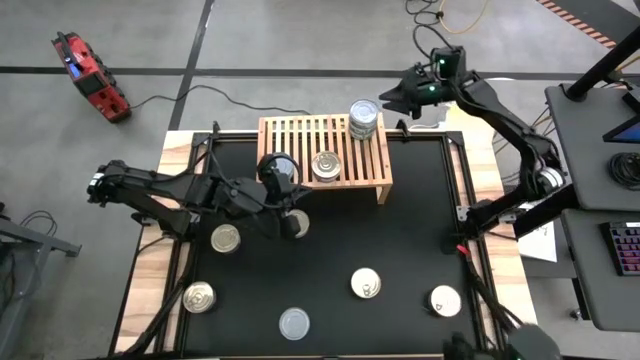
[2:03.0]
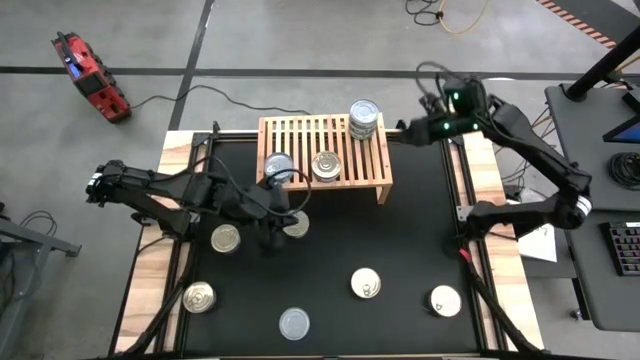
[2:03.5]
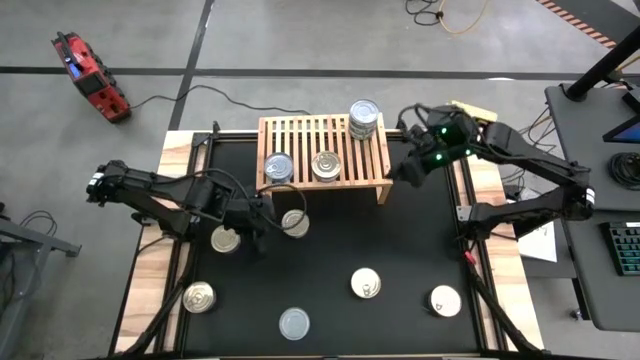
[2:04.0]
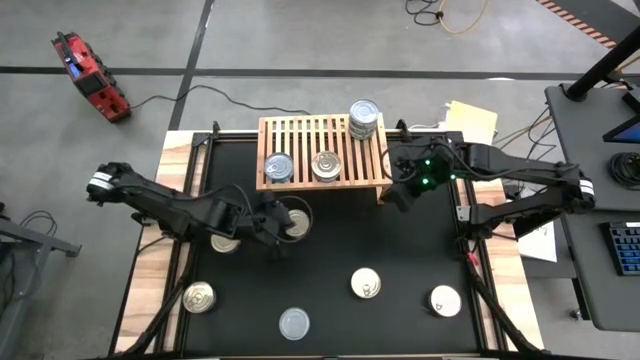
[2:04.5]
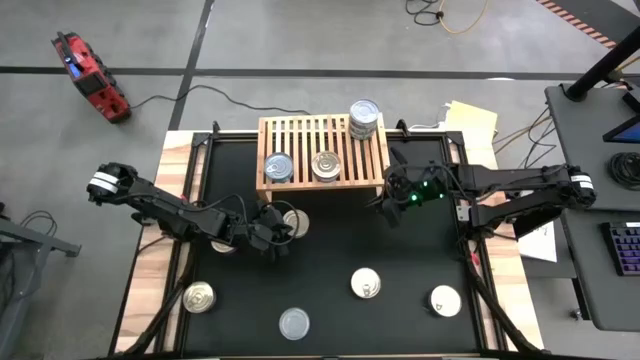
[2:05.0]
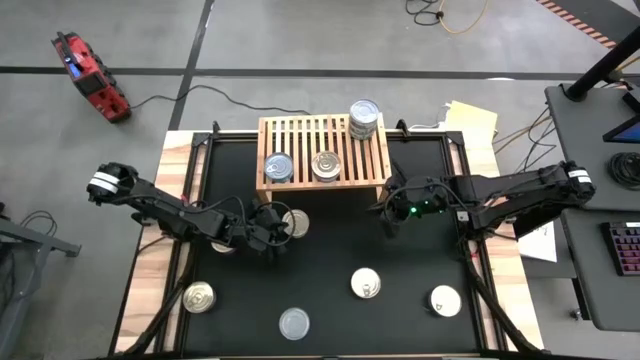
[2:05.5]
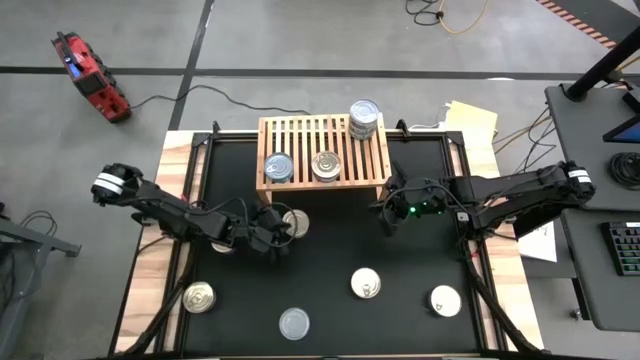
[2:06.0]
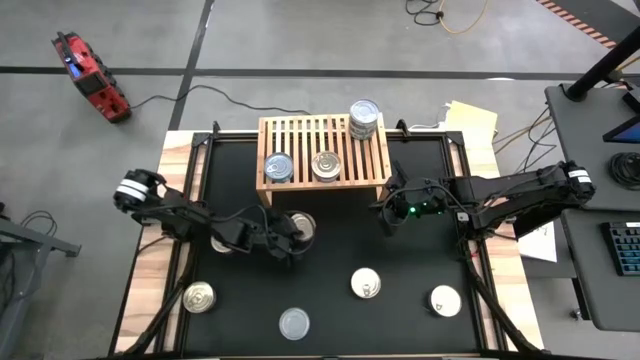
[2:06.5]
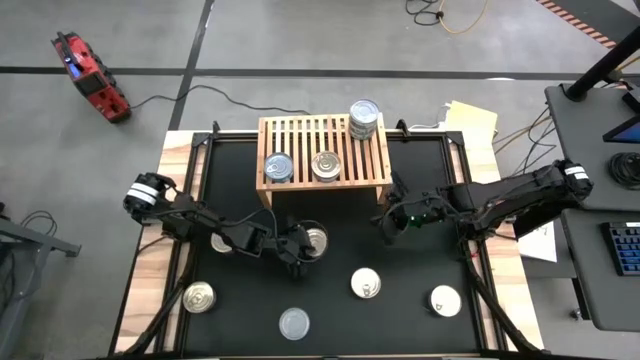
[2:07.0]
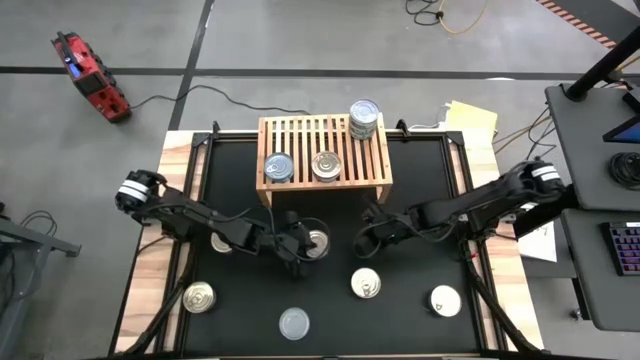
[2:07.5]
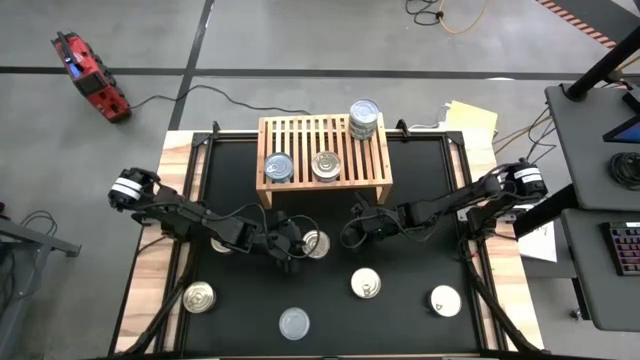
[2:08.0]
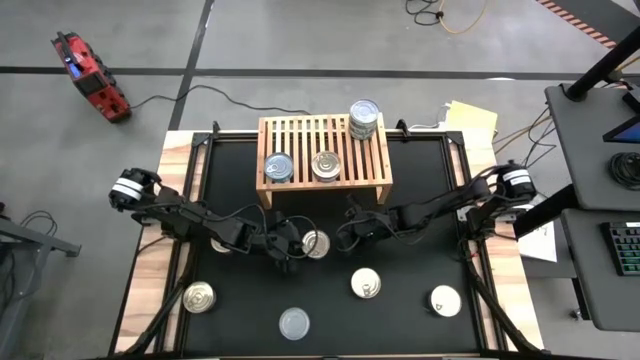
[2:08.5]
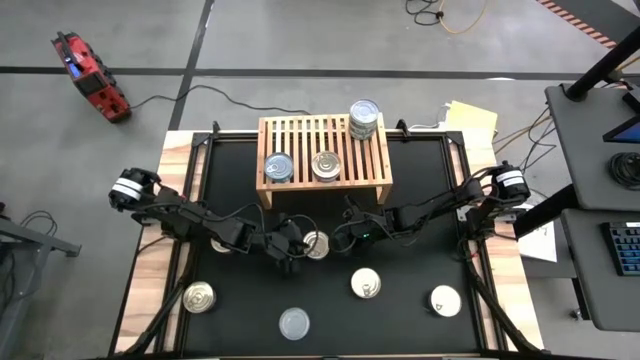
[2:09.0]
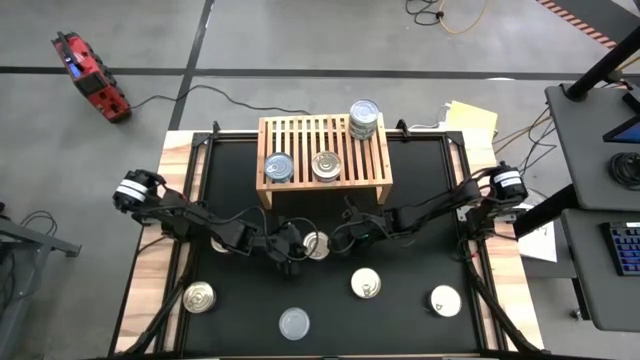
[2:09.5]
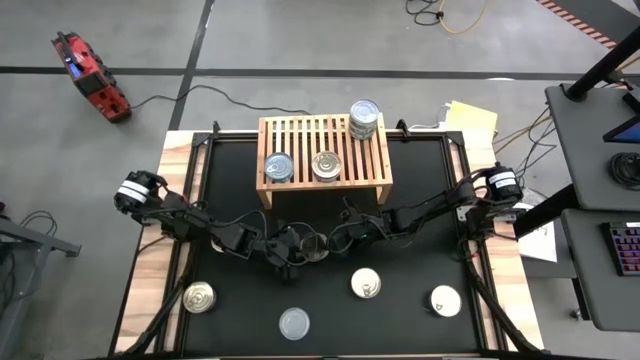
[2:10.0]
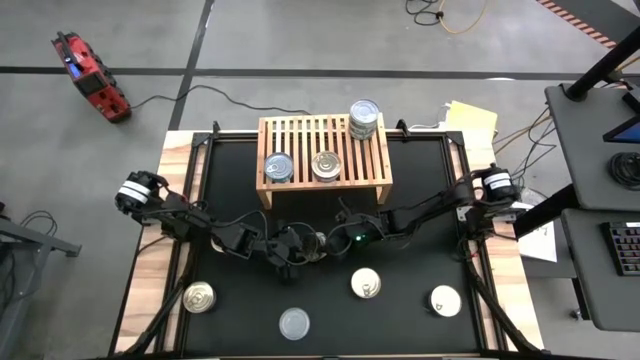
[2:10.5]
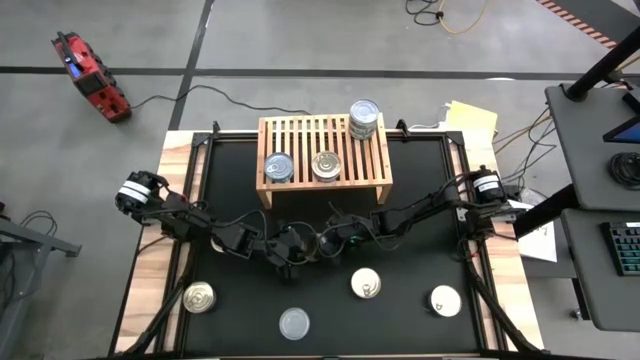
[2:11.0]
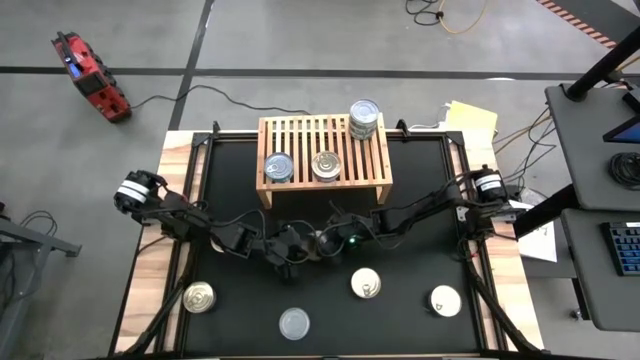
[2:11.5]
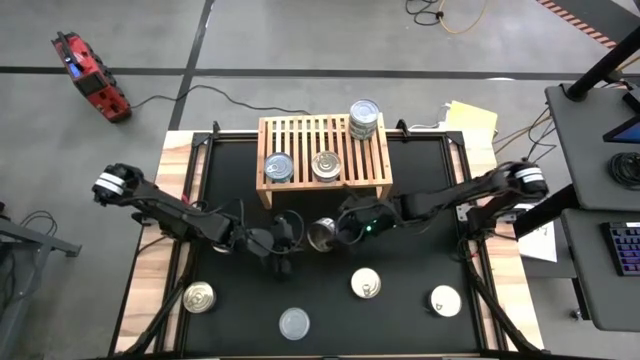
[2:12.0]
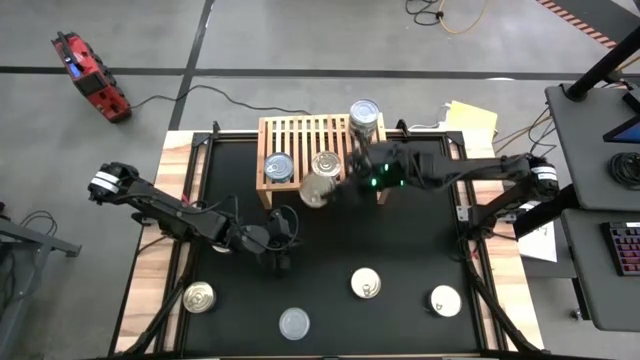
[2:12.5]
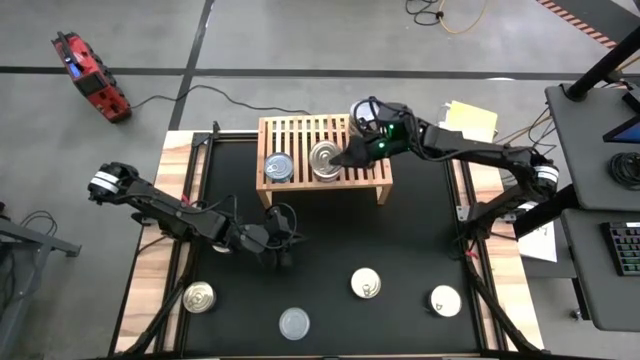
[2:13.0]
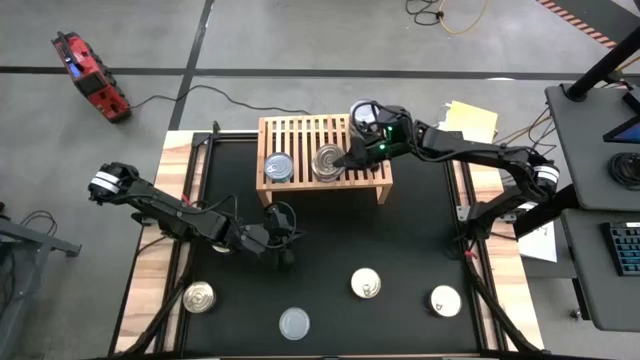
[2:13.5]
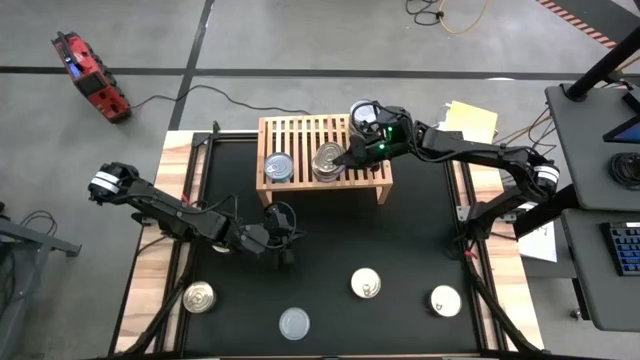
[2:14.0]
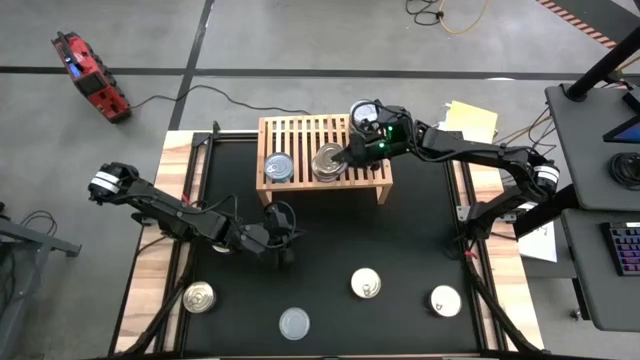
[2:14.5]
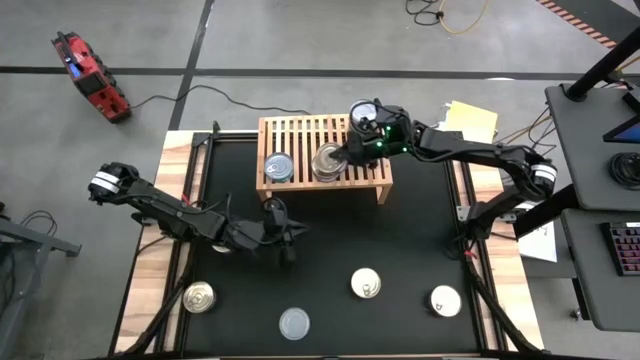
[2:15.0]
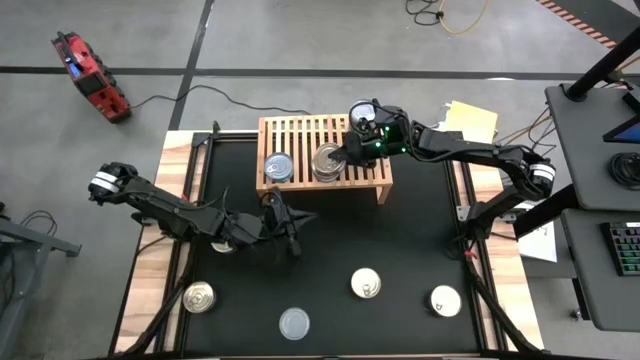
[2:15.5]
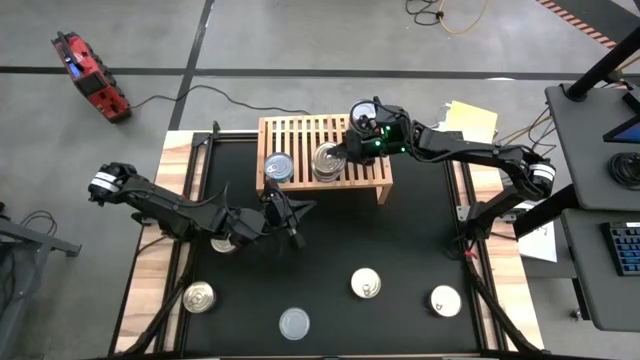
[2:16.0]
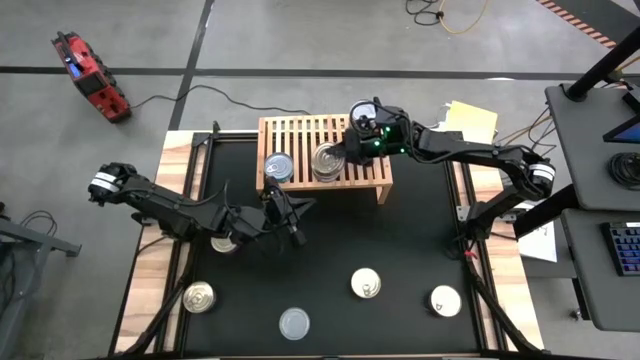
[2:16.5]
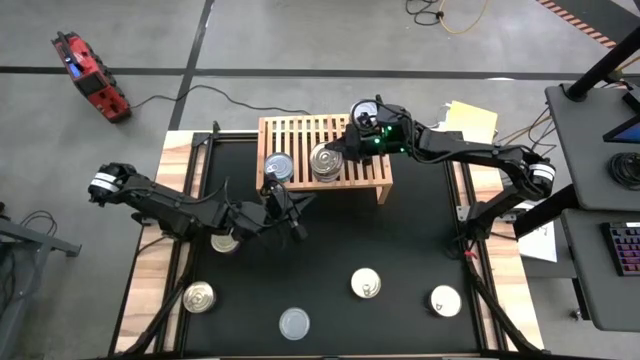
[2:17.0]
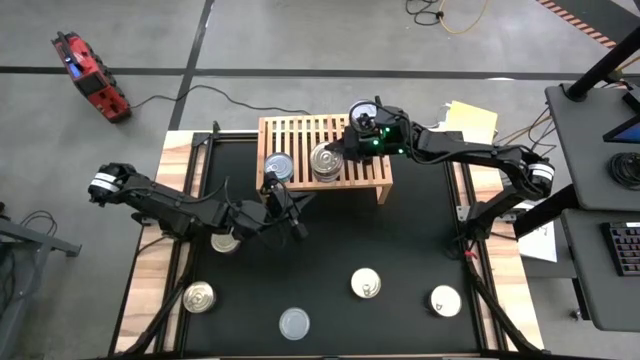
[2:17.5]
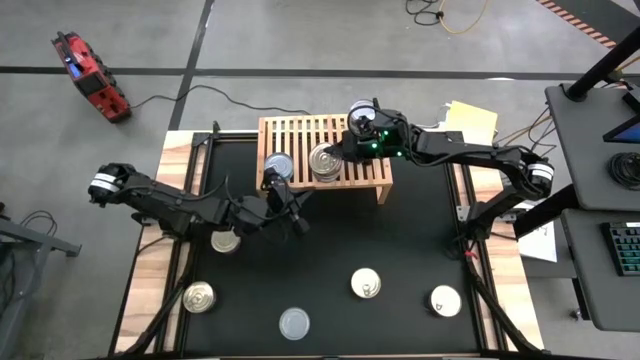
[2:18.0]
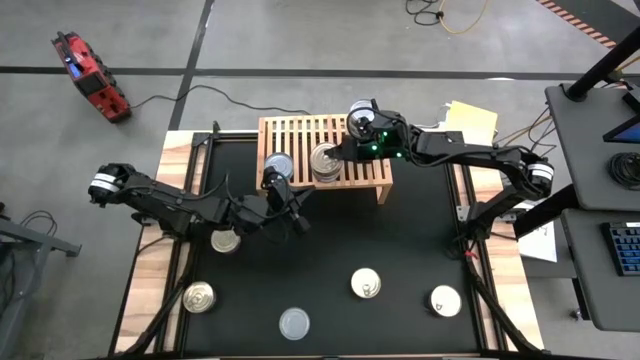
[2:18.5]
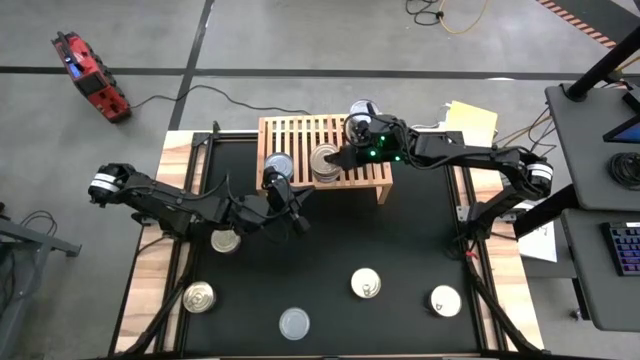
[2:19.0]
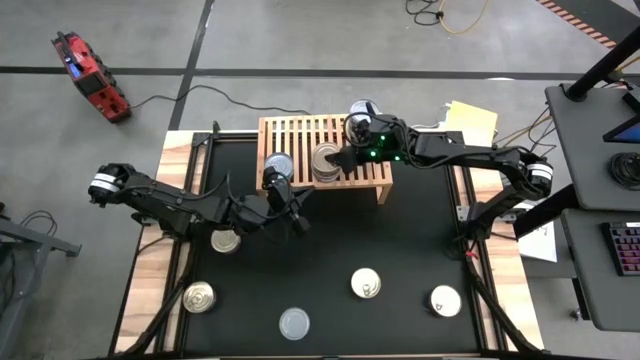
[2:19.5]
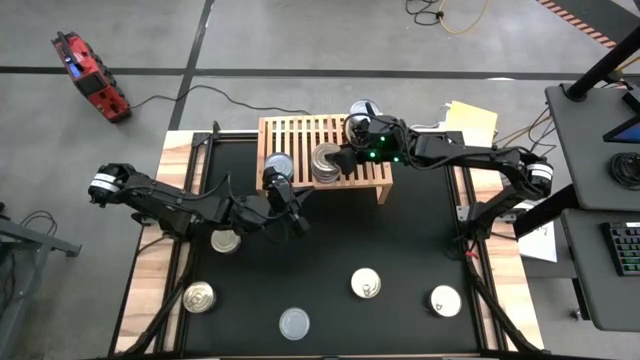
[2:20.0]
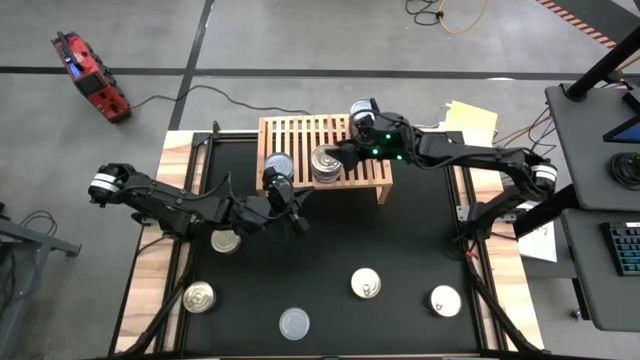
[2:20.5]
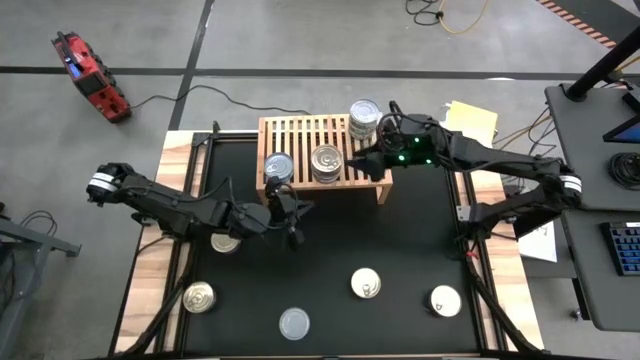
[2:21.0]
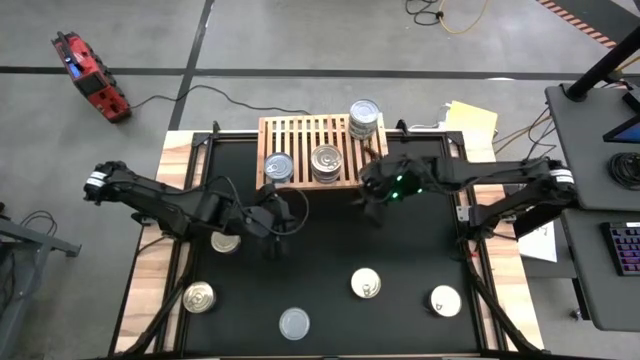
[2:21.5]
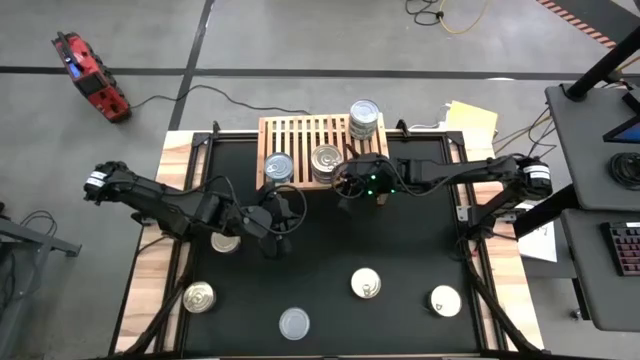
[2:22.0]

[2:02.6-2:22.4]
Task: Stack canned seafood by type on shelf
Stack the blue pink tuna can on top of the blue pink tuna can on the shelf

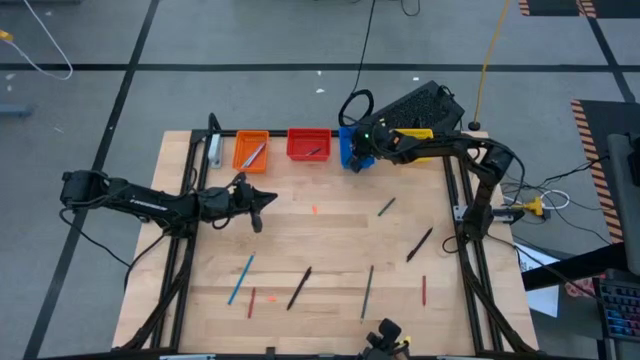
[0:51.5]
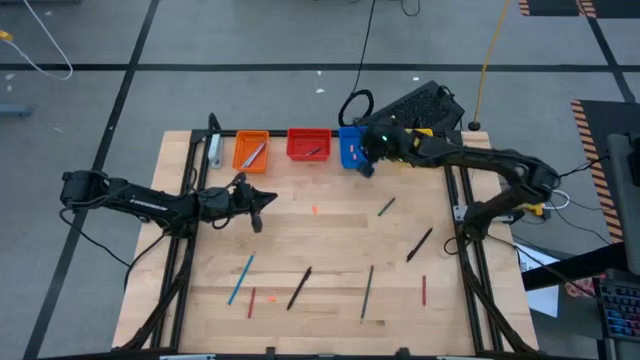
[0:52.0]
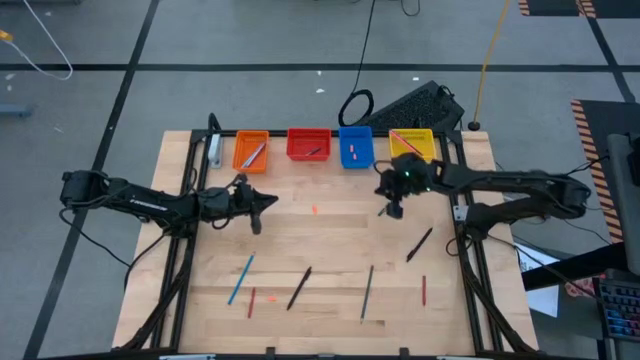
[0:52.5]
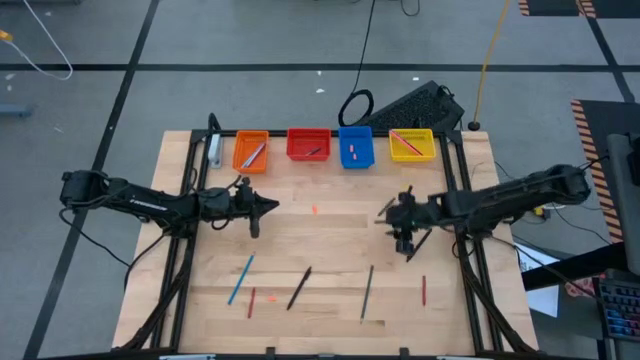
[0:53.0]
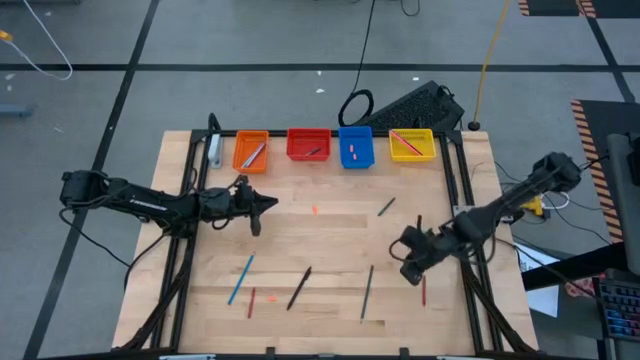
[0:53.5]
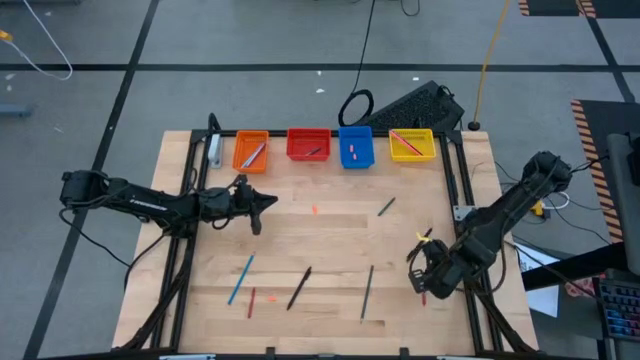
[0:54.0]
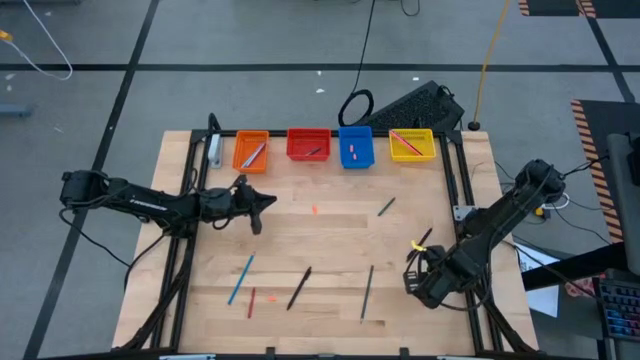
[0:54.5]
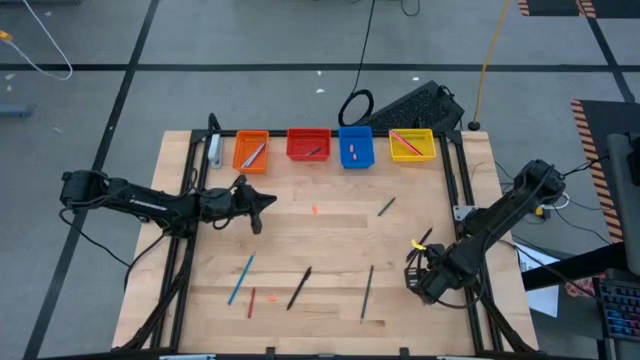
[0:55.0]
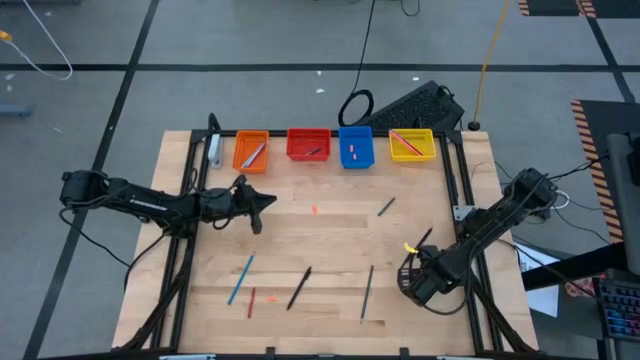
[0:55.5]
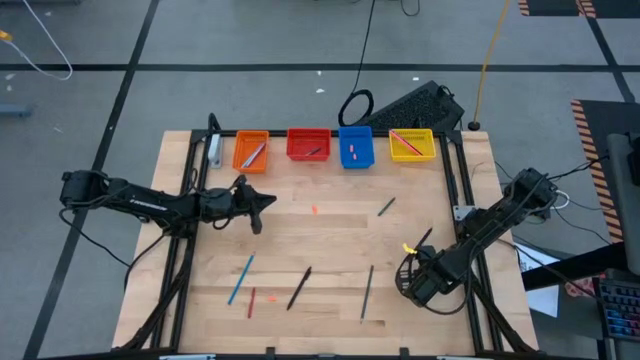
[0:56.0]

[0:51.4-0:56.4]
Task: Sort crayons/erasers/pens/pencils in bins
Put the right red crayon into the red basket
